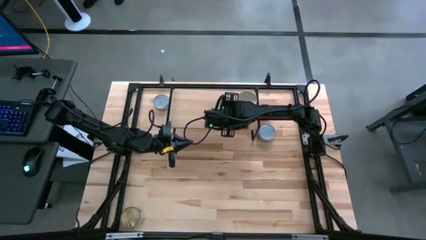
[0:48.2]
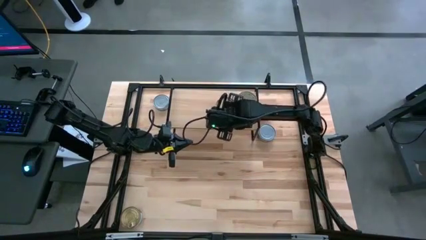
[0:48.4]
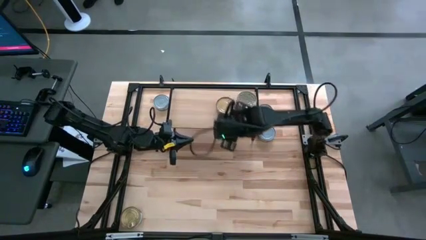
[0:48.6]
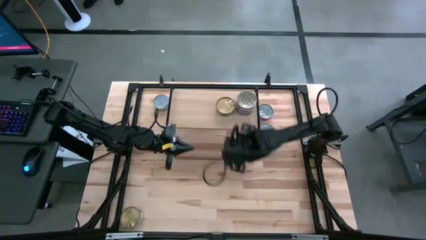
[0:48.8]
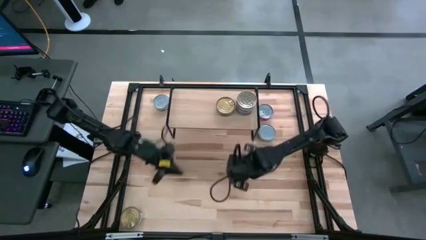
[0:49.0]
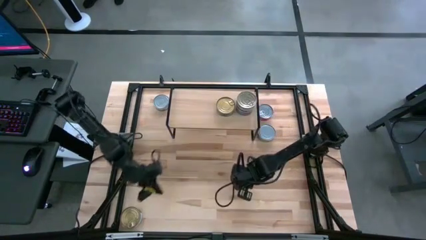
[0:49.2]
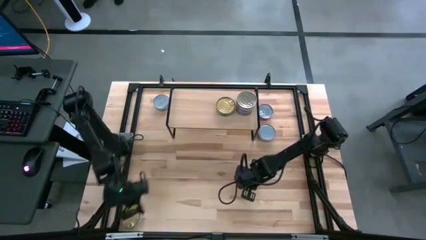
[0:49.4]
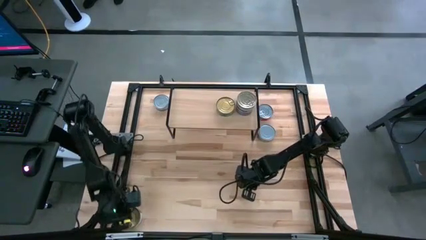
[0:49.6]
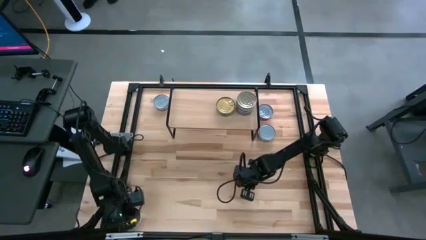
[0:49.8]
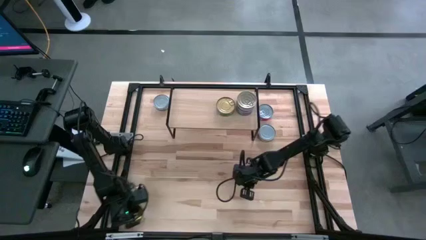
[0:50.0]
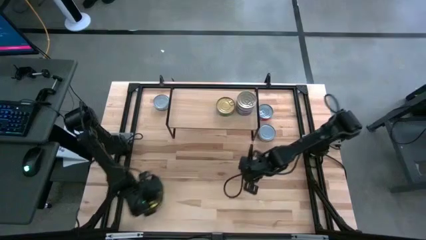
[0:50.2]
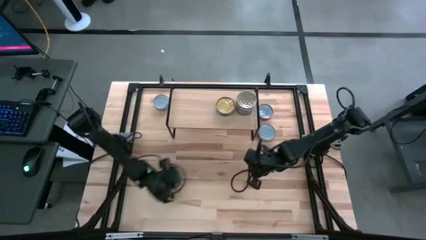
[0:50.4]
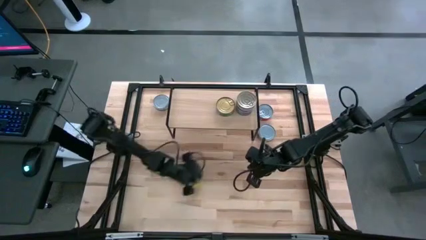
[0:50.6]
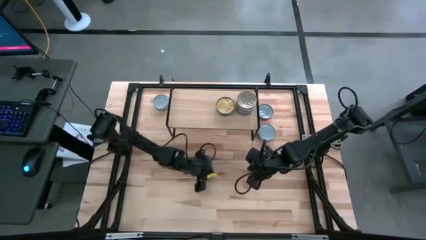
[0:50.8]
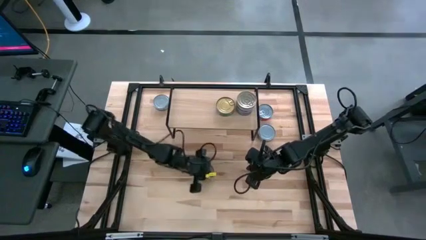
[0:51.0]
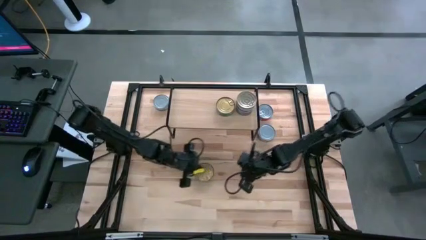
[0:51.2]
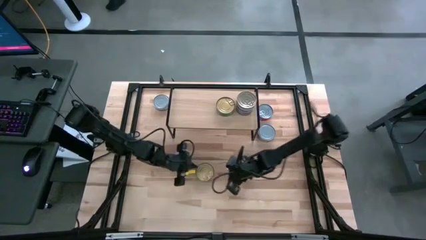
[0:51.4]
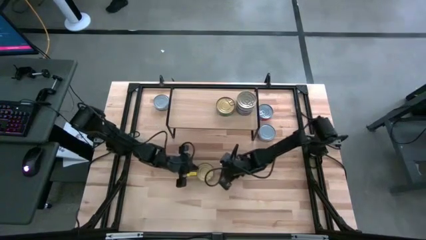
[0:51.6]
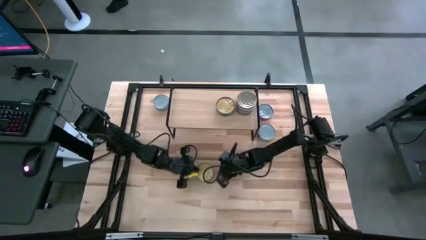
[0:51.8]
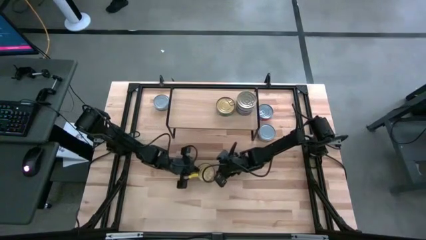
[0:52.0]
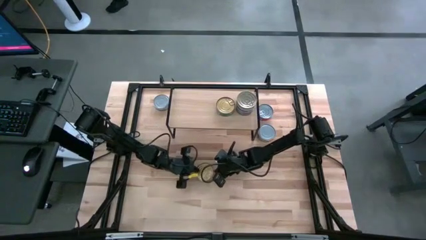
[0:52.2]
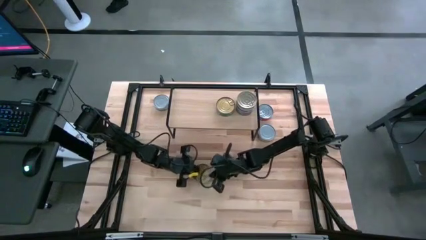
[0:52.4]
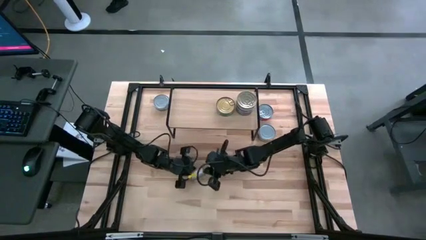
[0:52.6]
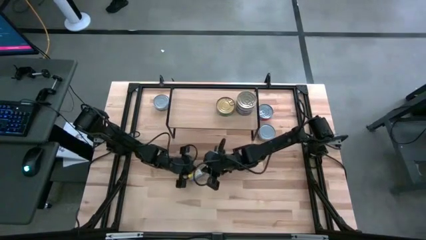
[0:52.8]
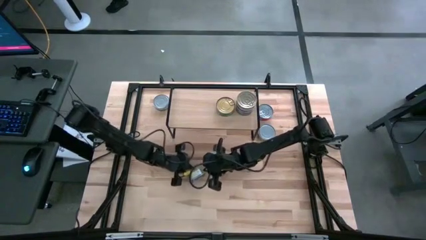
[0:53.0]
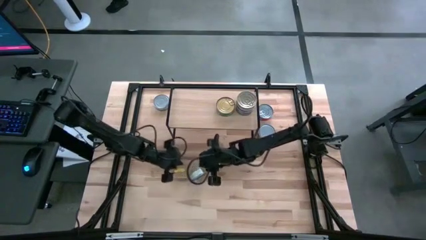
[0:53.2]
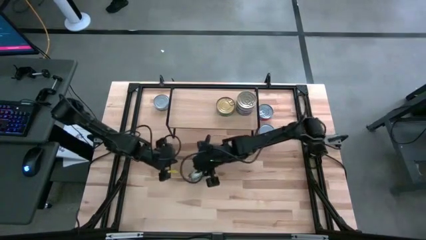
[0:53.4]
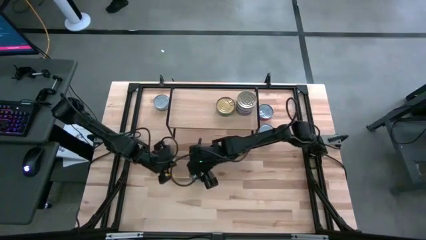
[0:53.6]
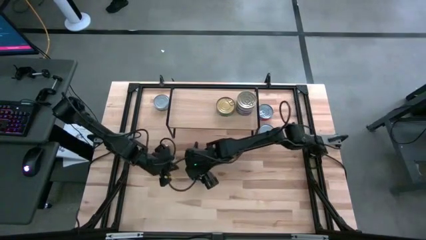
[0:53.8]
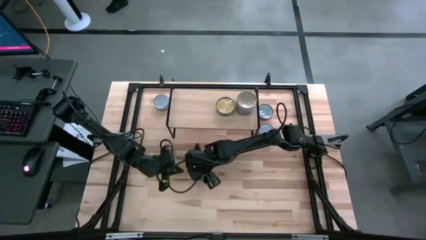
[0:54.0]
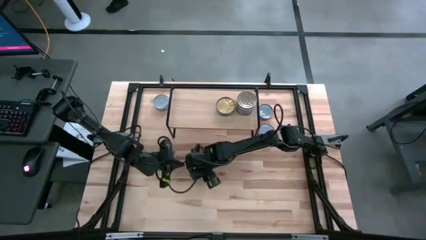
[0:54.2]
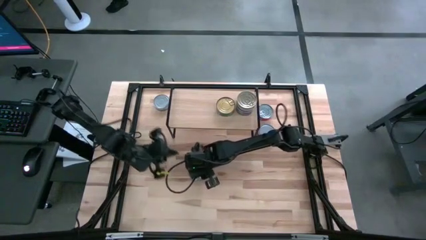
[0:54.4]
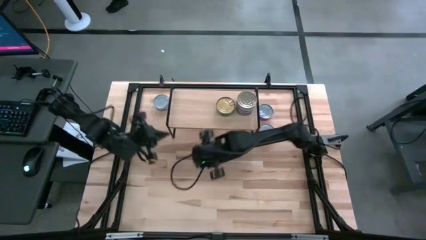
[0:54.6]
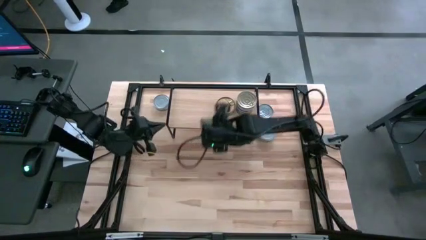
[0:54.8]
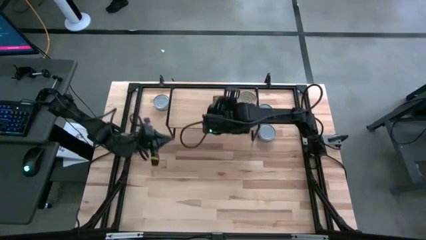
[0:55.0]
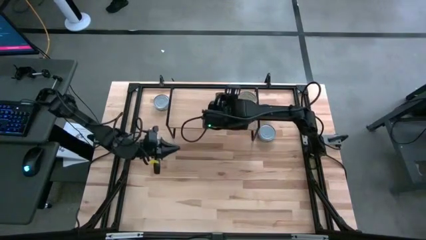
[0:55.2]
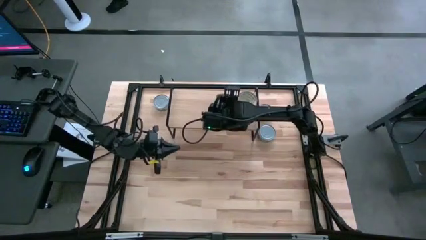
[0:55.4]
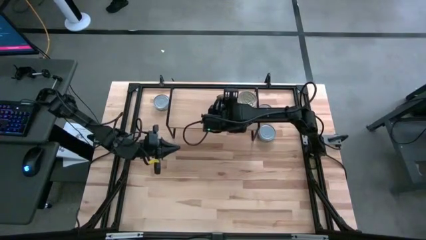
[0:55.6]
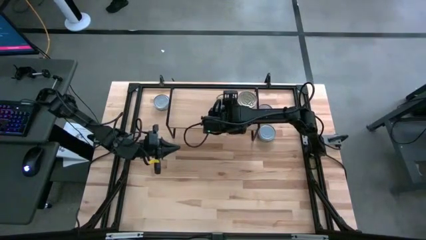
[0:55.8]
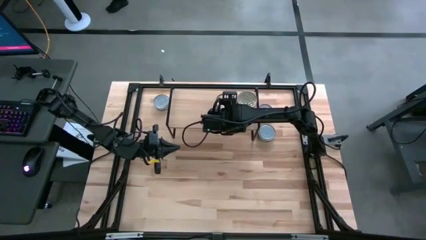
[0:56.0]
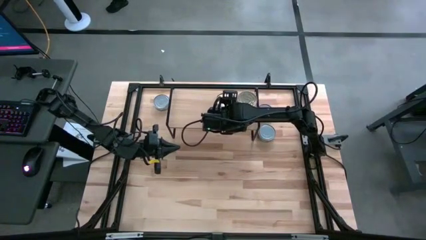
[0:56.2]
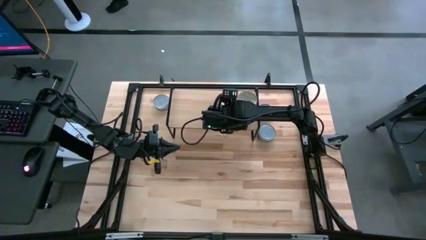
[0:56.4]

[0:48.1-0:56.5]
Task: Stack canned seafood by type on shelf
Stack the green tuna can on the green tuna can on the shelf

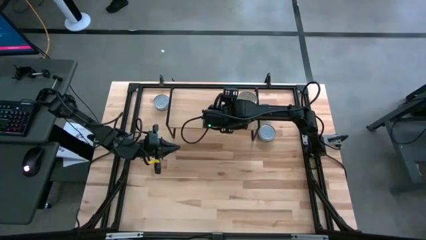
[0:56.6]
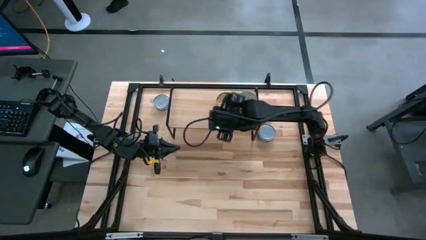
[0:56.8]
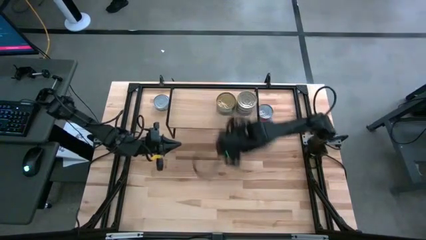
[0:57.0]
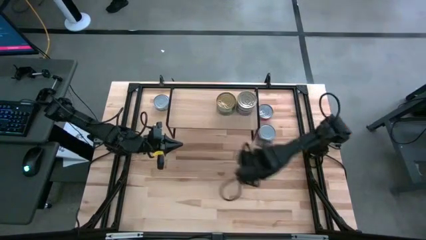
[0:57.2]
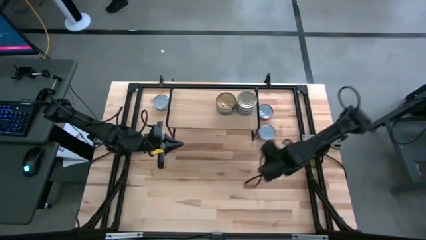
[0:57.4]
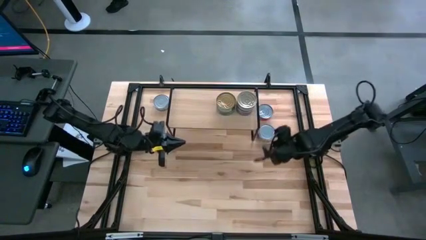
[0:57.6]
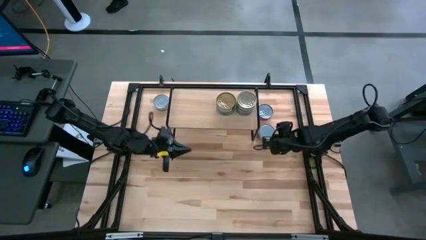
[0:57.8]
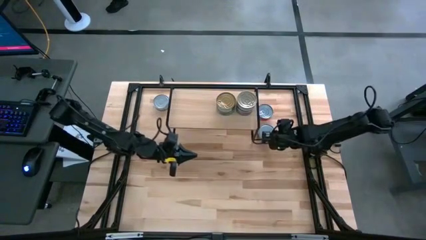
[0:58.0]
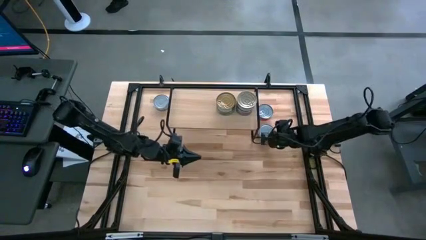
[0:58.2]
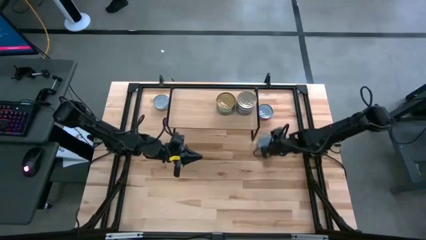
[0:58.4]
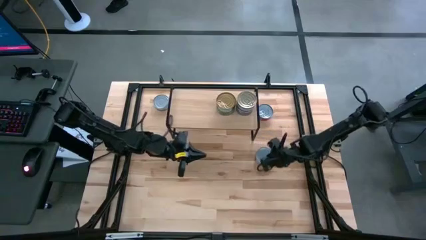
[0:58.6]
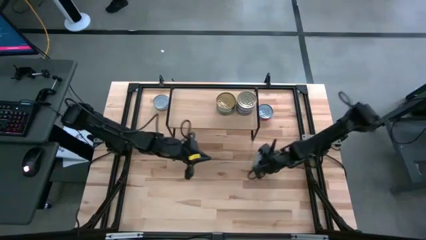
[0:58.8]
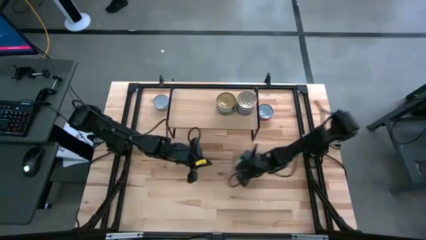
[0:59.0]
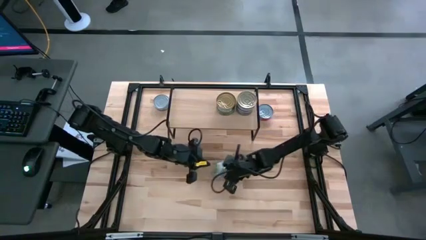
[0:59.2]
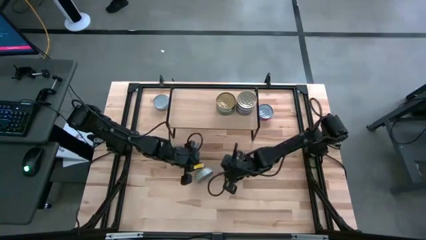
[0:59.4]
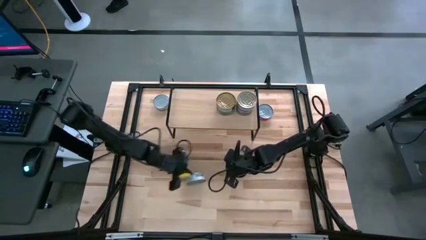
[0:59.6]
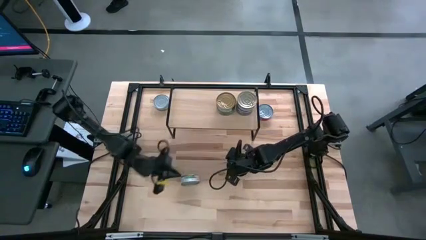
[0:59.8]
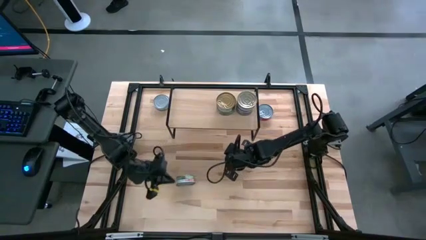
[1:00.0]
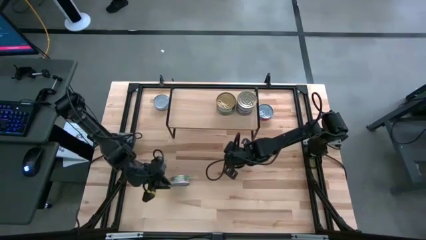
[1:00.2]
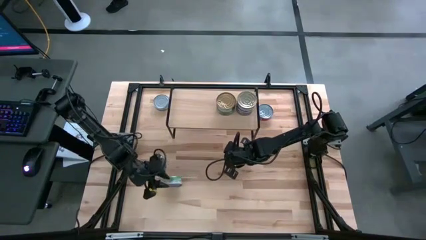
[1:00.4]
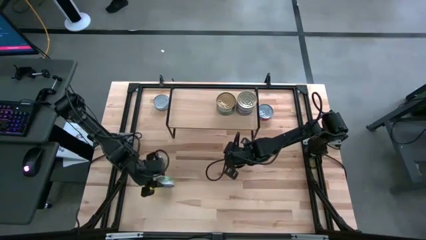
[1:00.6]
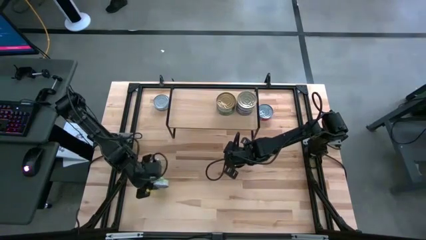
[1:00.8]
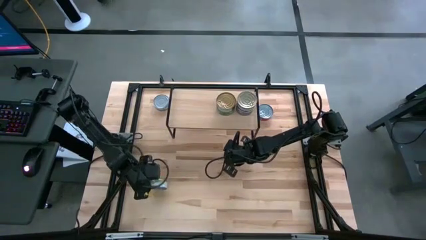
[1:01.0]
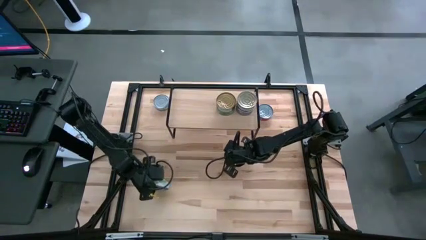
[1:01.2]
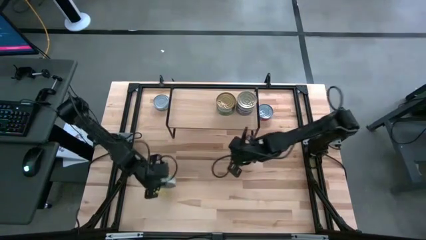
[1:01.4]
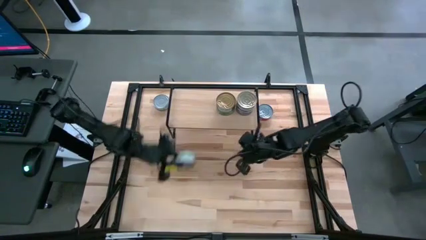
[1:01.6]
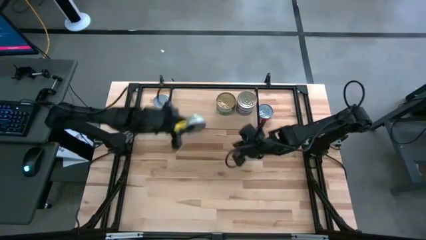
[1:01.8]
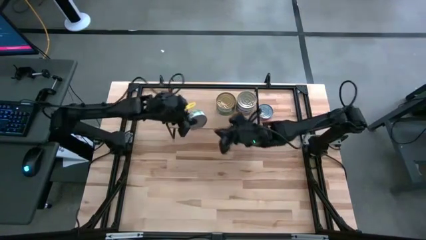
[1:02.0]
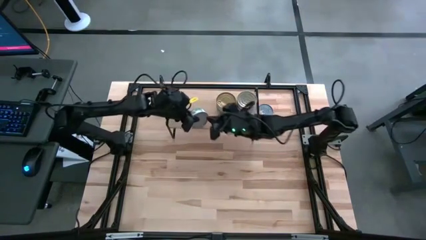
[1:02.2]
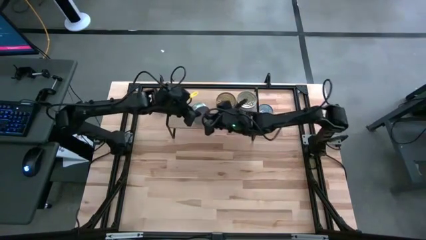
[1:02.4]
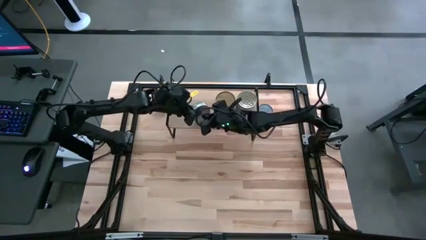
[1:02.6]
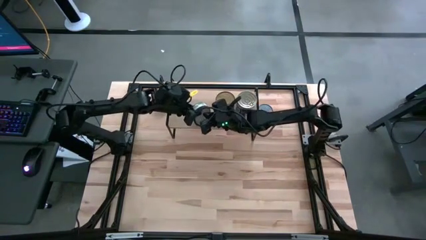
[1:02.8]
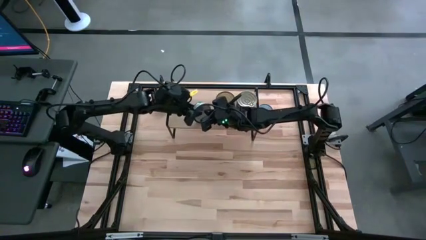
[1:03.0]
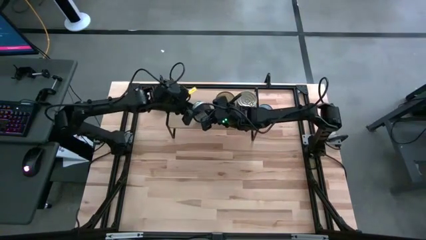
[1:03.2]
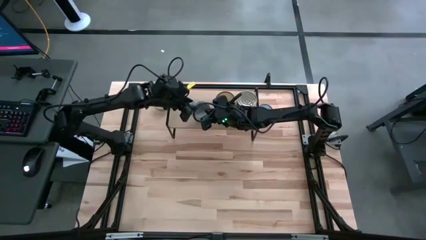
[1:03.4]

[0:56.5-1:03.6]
Put the right green white tuna can on the shelf
